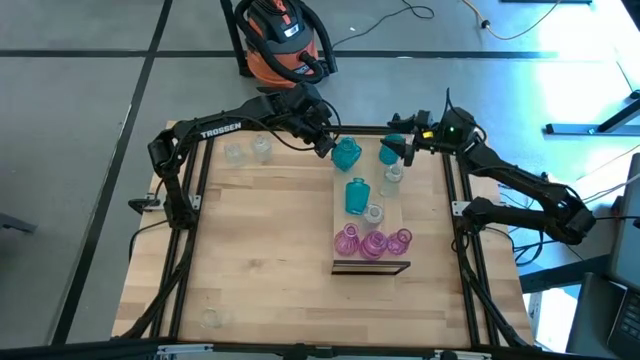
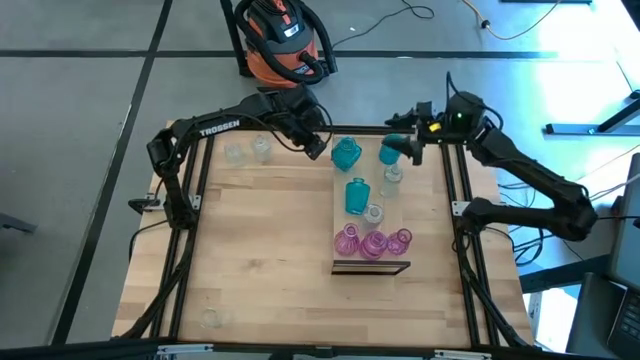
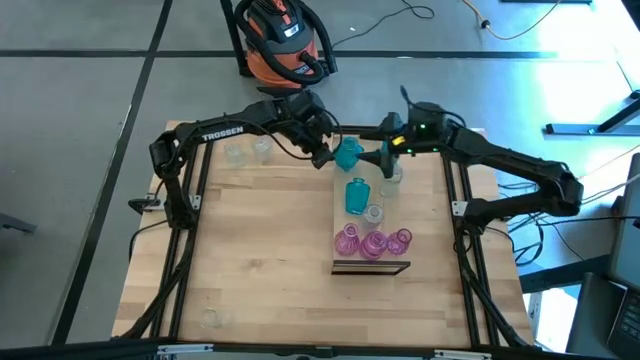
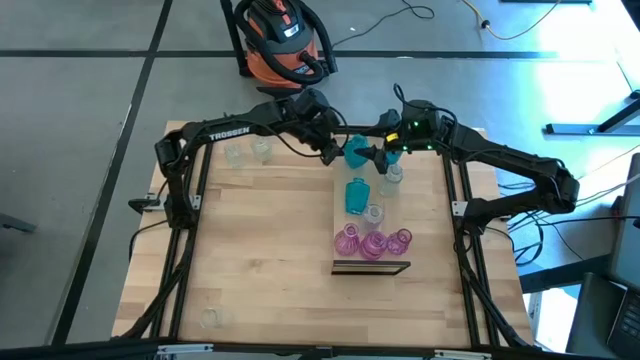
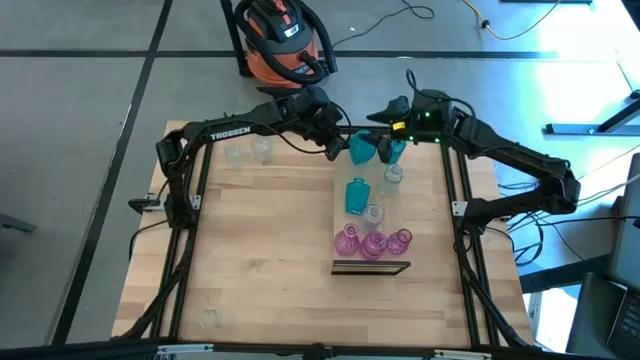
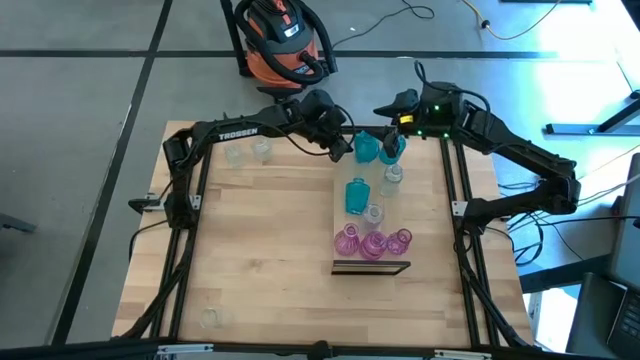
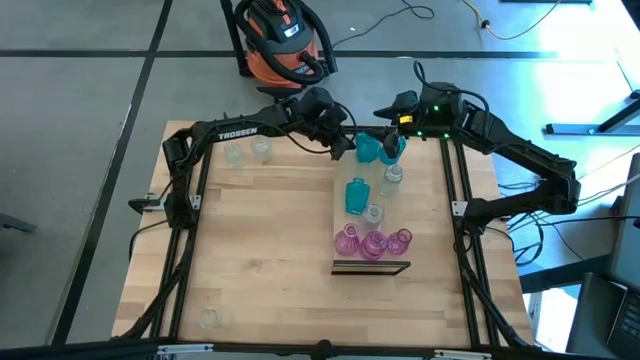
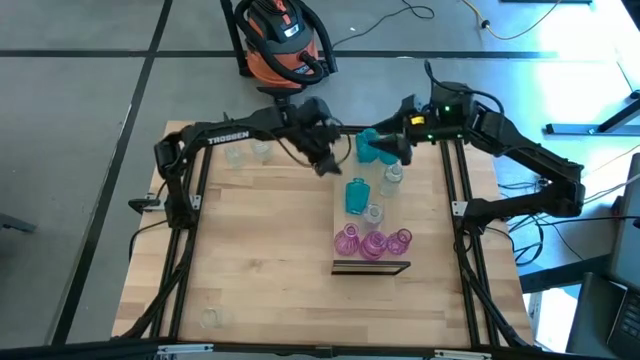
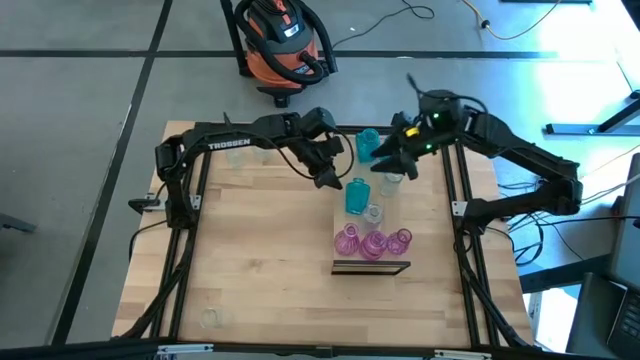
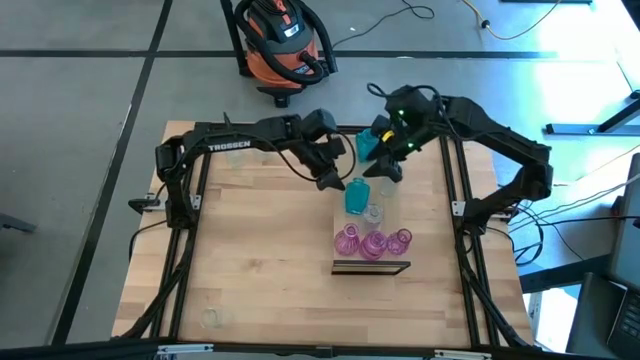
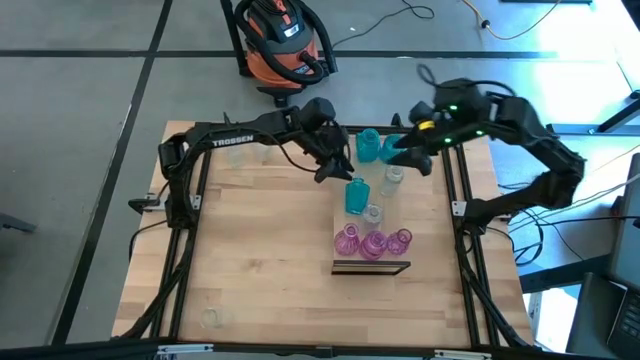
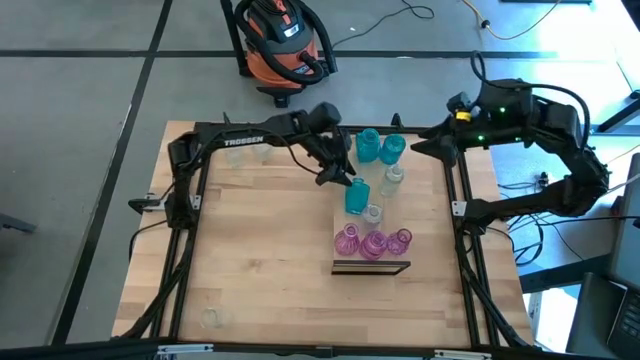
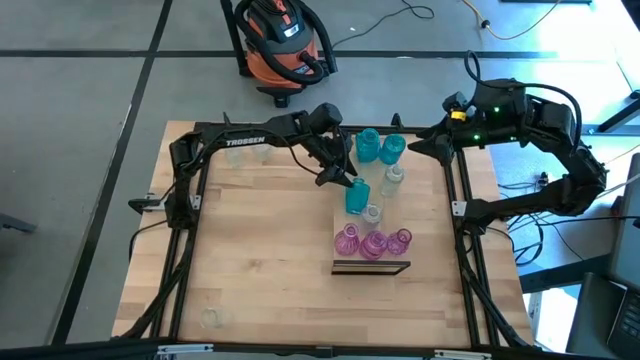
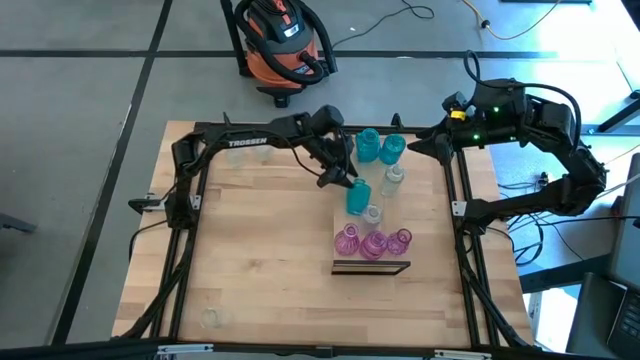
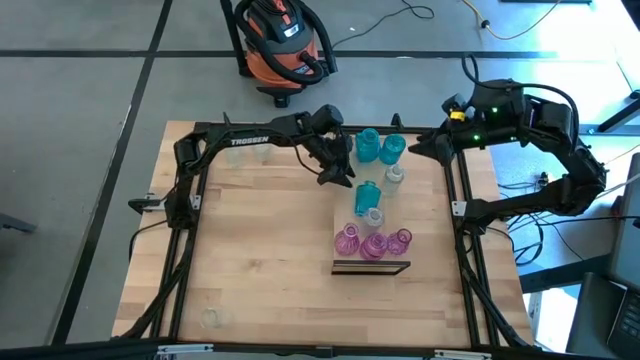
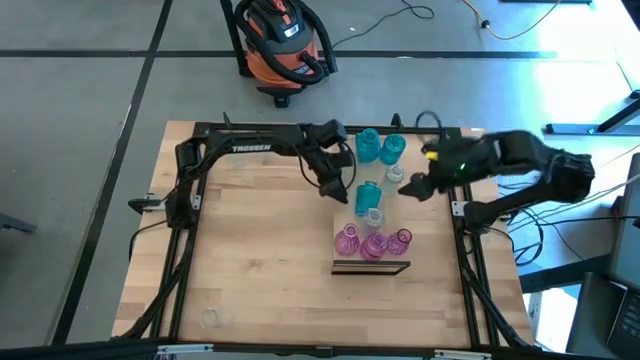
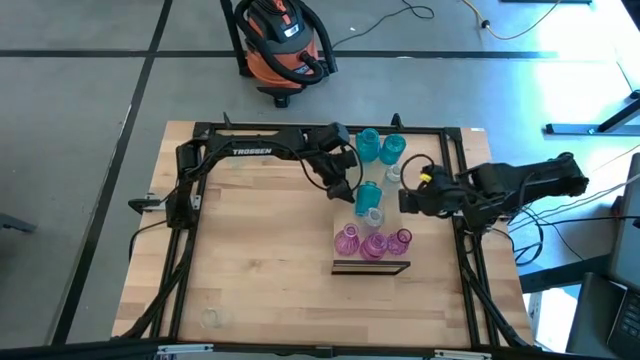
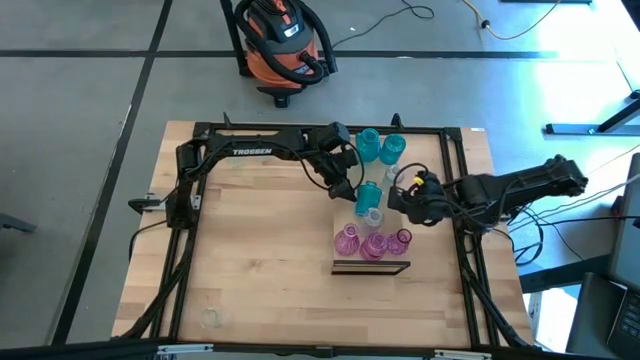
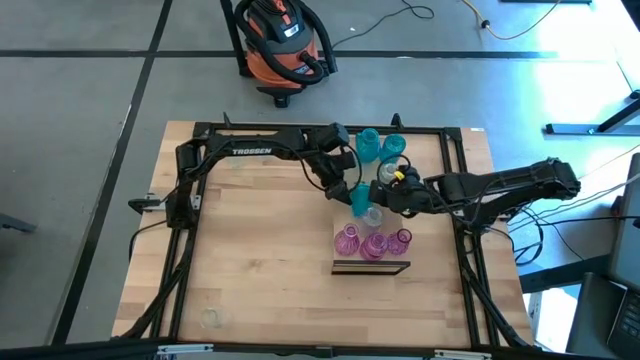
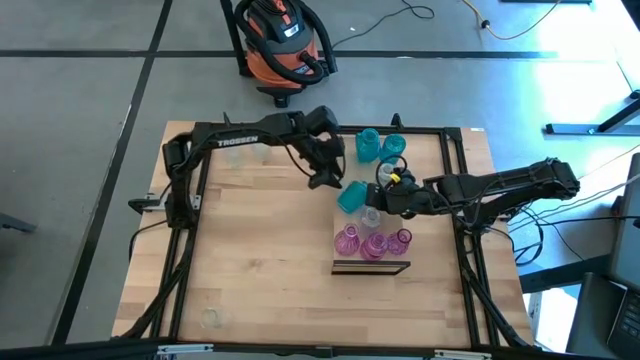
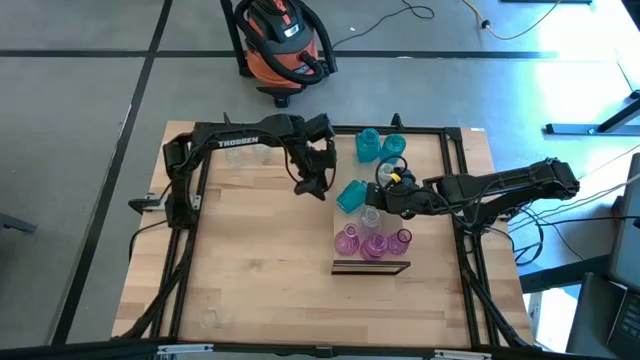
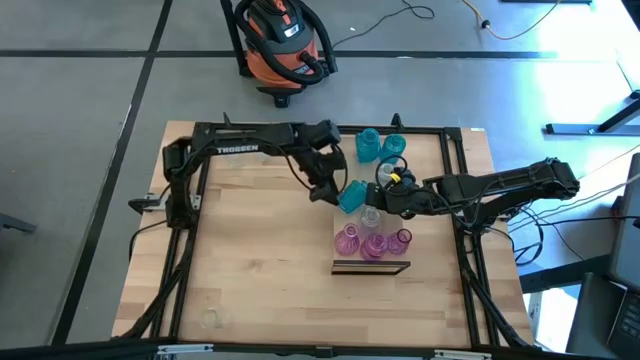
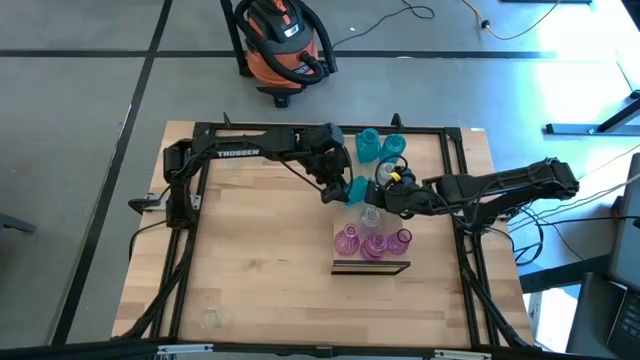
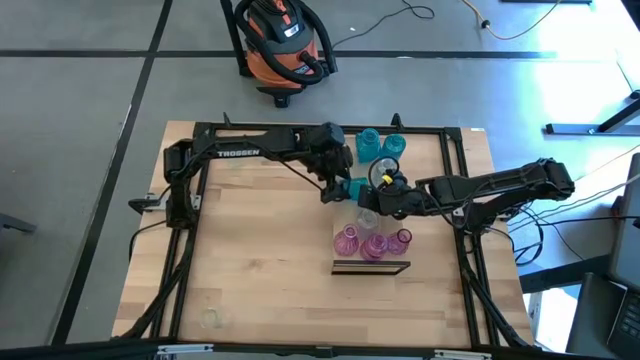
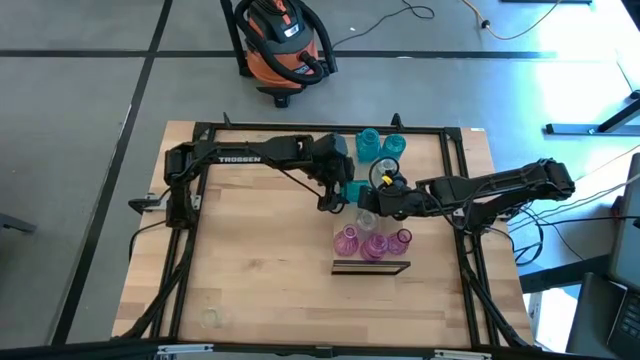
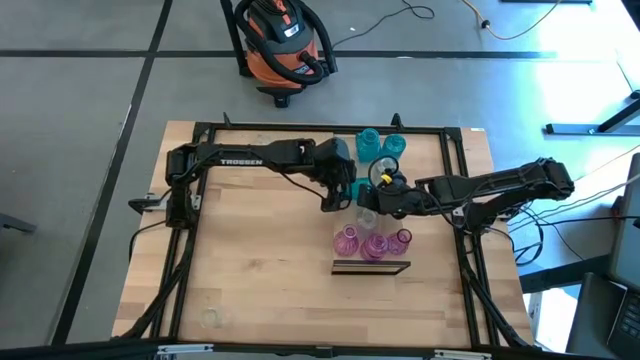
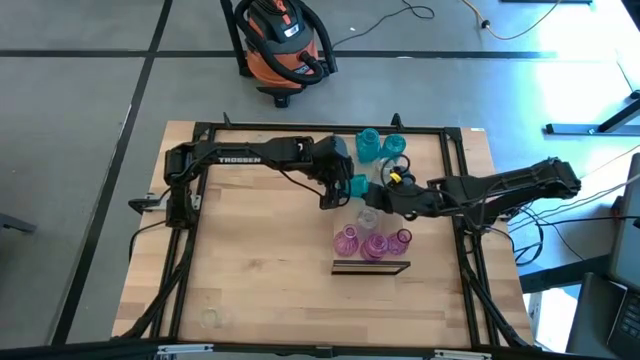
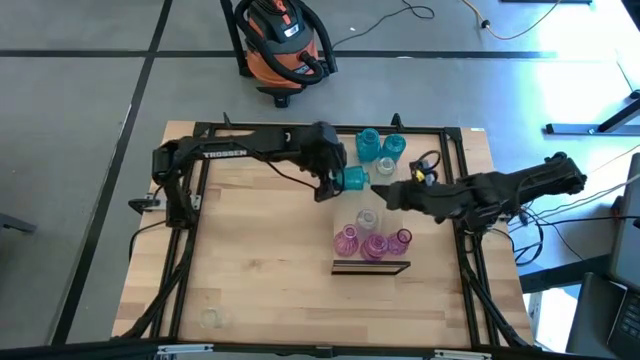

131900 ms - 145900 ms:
Task: sort vases onto shelf
Adjust the blue vase on the shelf

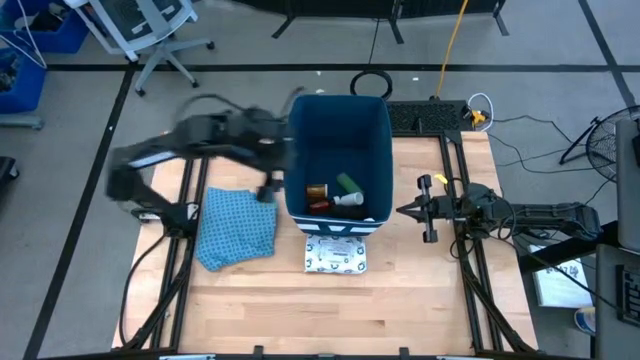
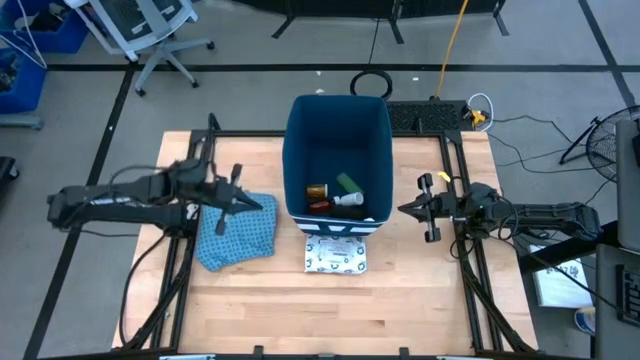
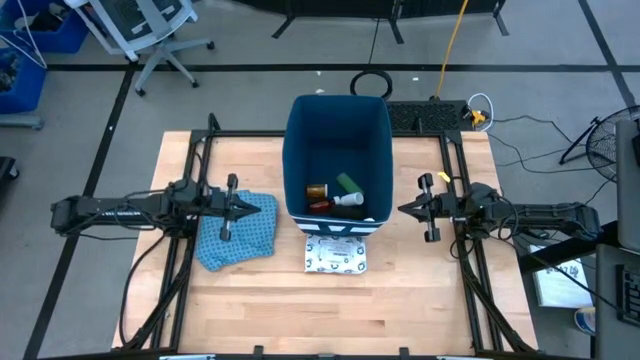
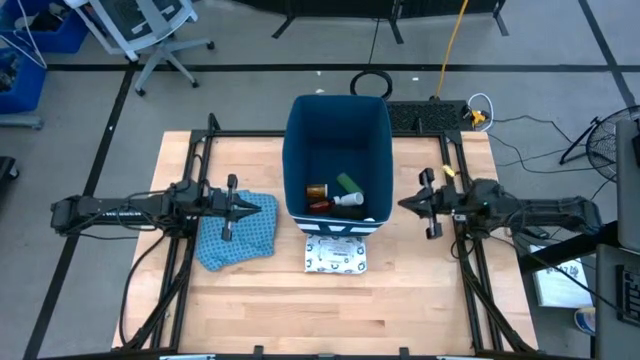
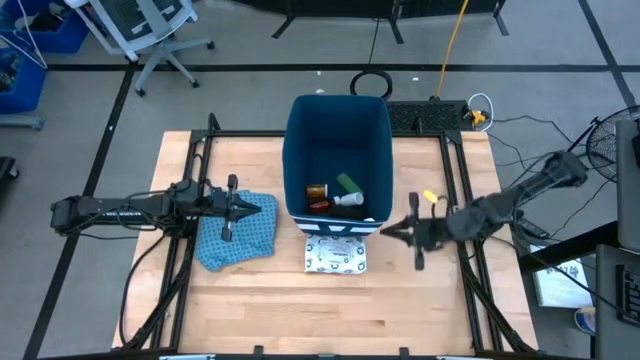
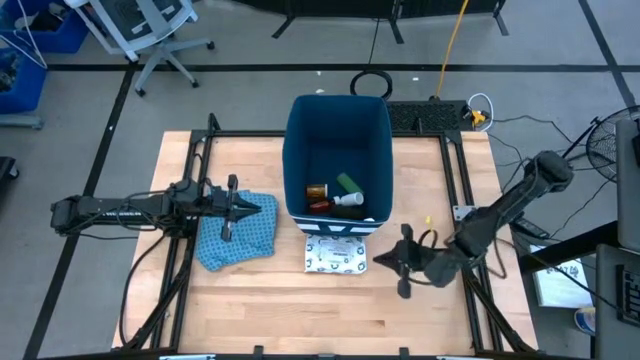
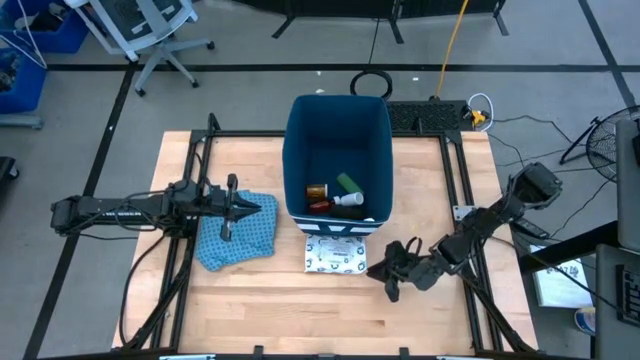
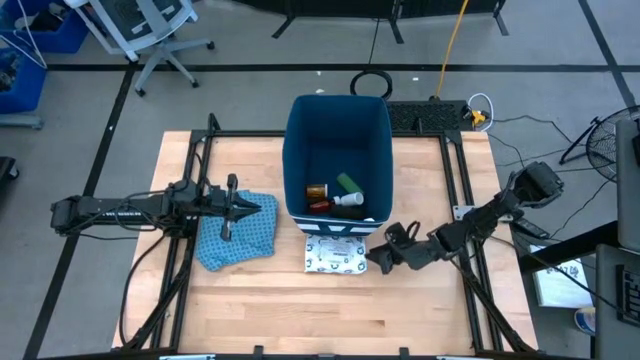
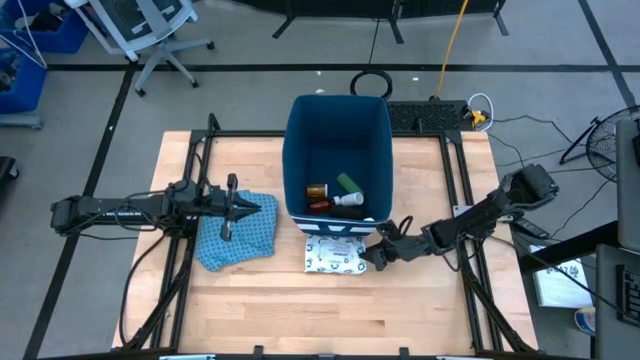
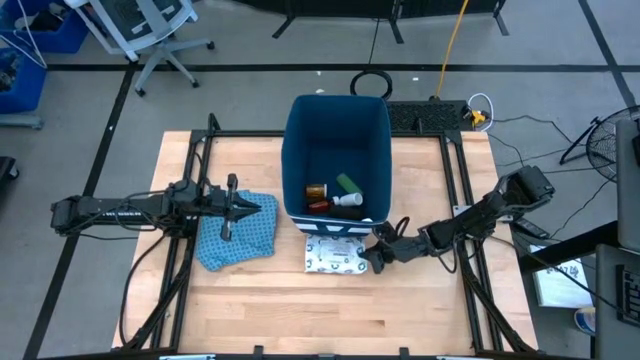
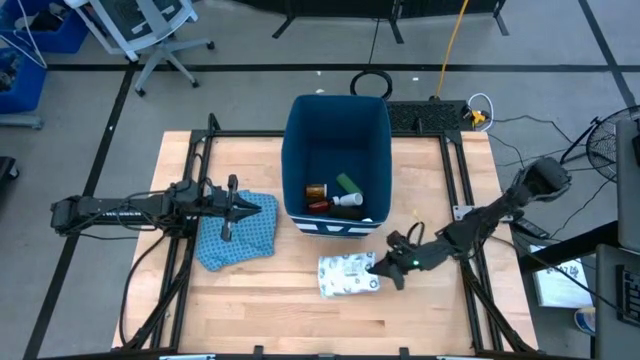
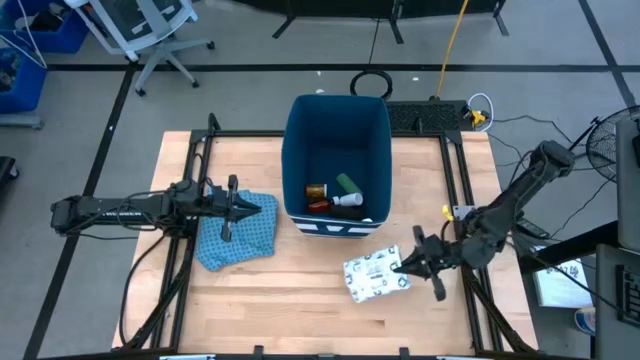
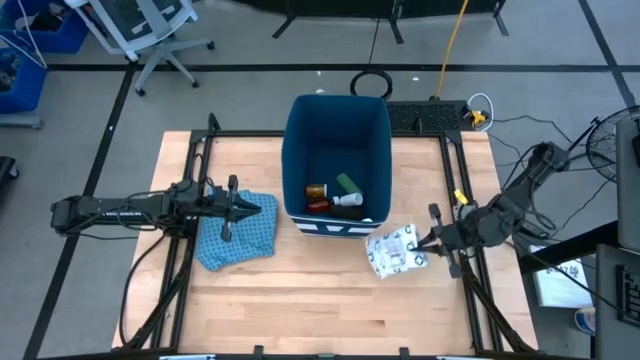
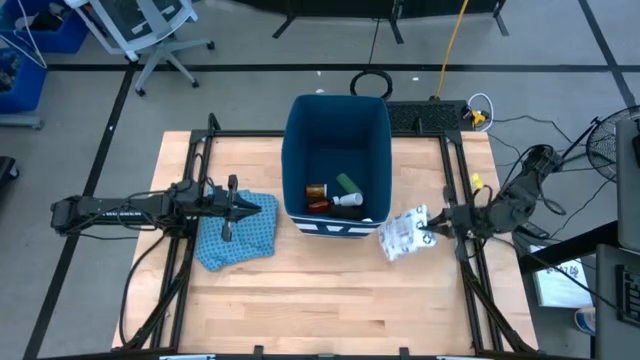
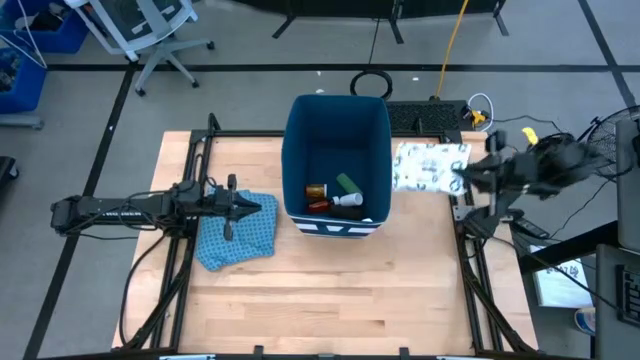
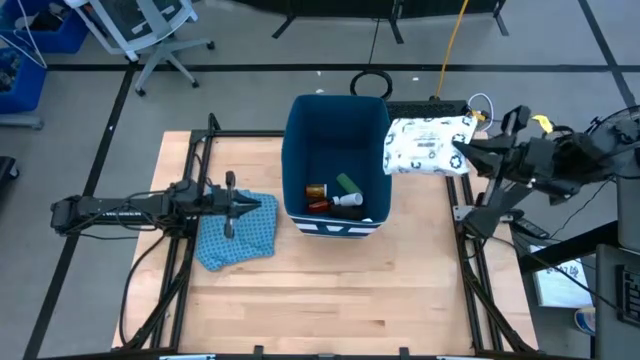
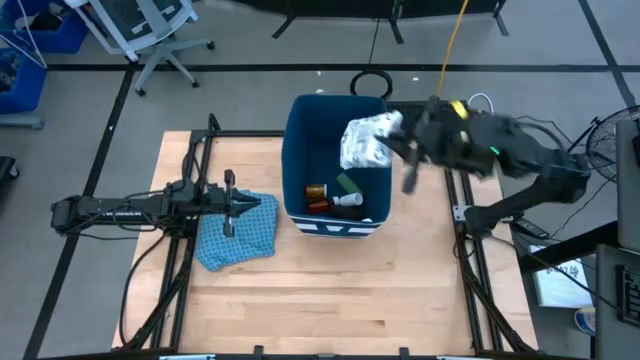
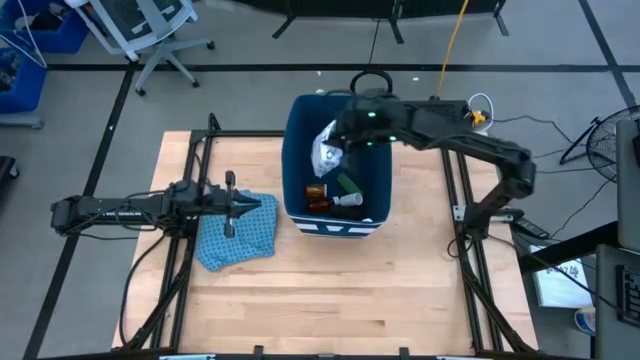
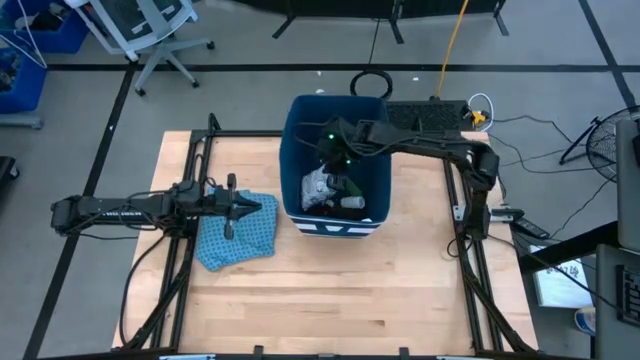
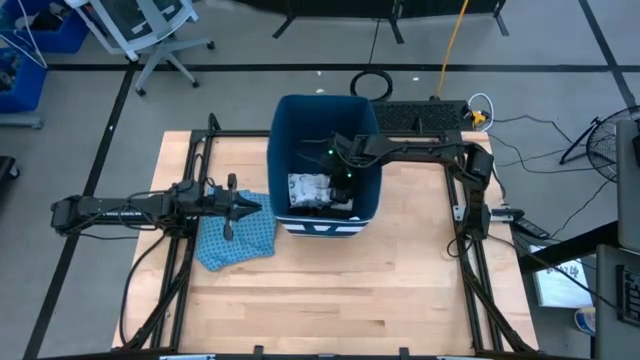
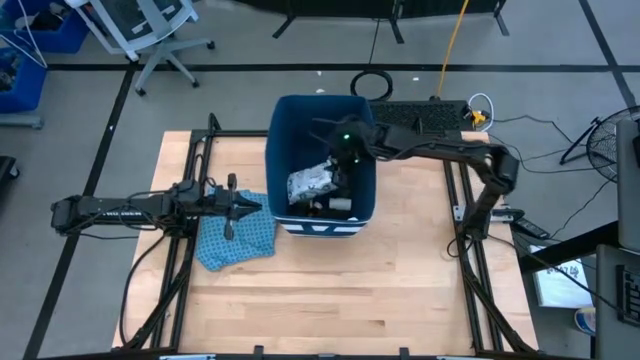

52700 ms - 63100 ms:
Task: Pick & place medical supplies in basket/bin
Put the mailer bag into the blue bin
